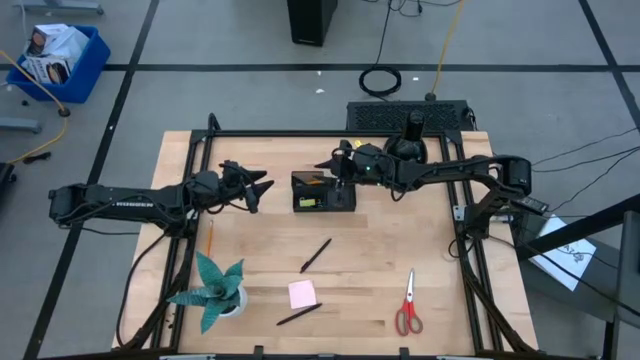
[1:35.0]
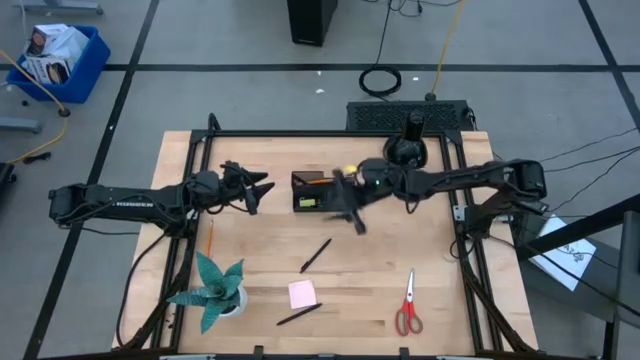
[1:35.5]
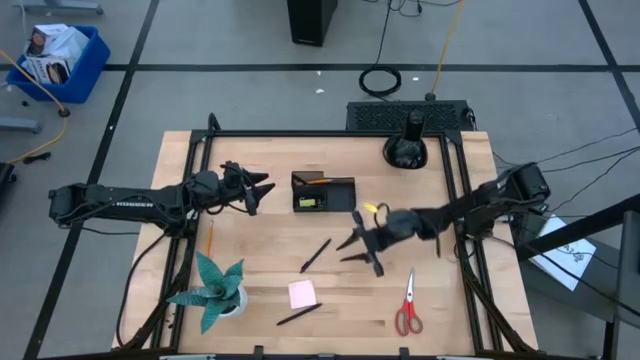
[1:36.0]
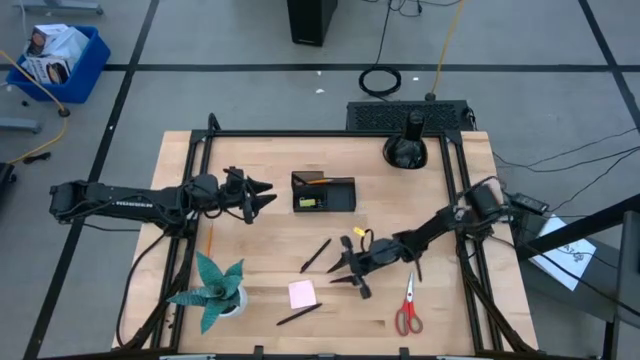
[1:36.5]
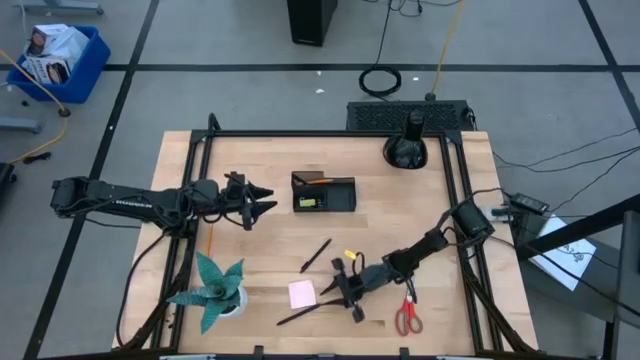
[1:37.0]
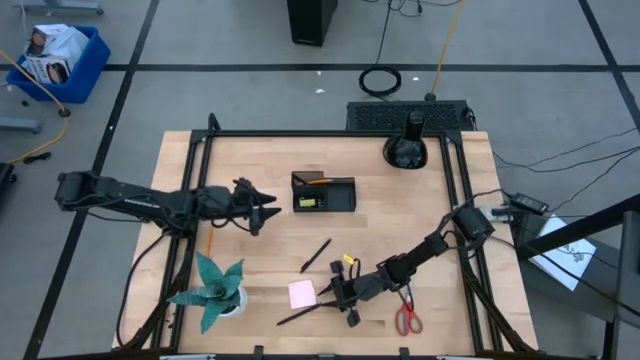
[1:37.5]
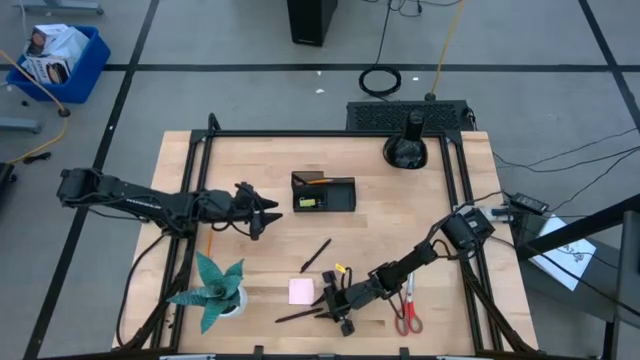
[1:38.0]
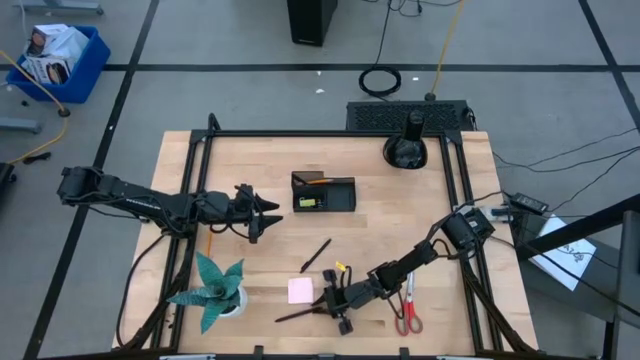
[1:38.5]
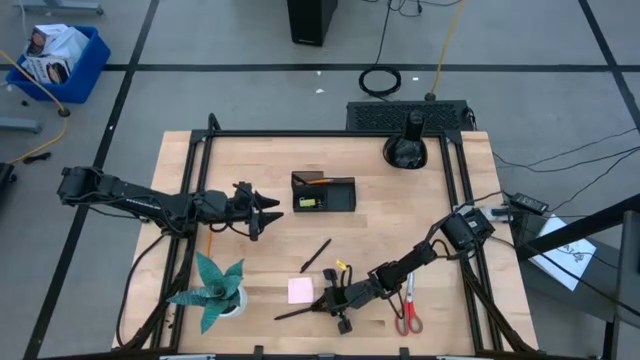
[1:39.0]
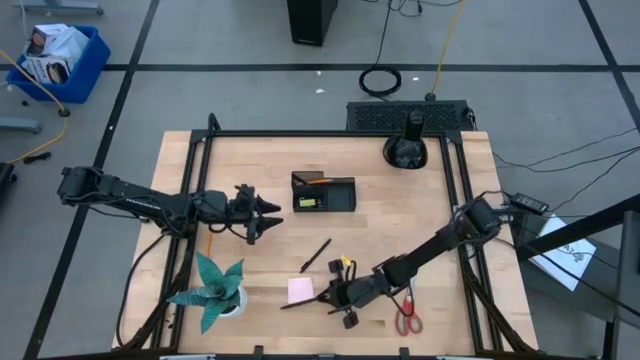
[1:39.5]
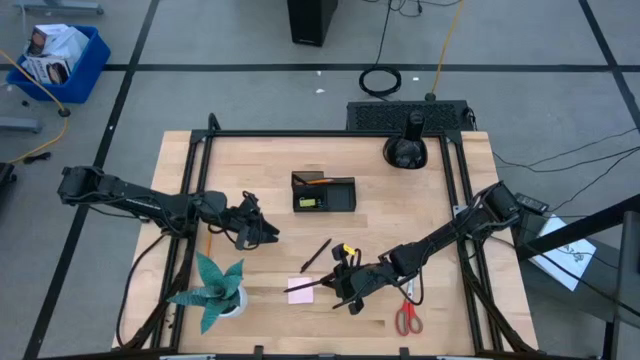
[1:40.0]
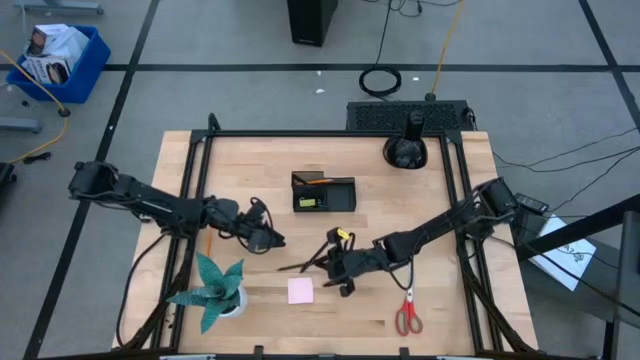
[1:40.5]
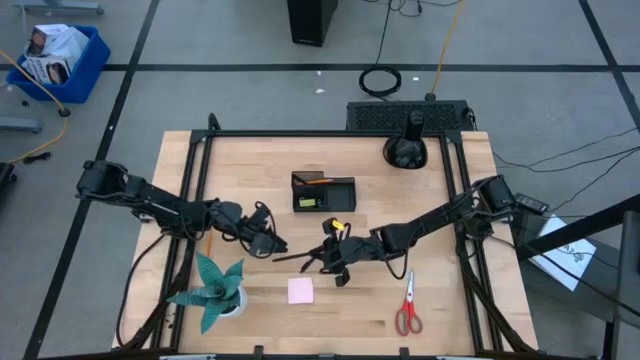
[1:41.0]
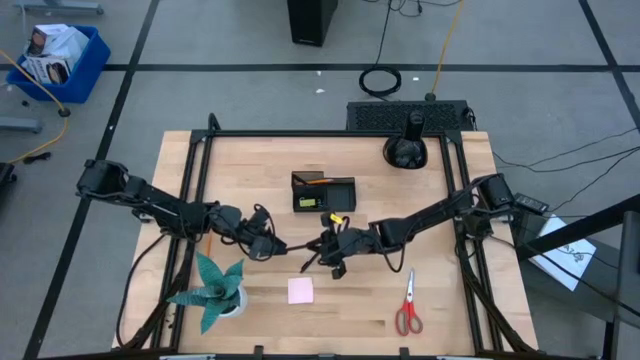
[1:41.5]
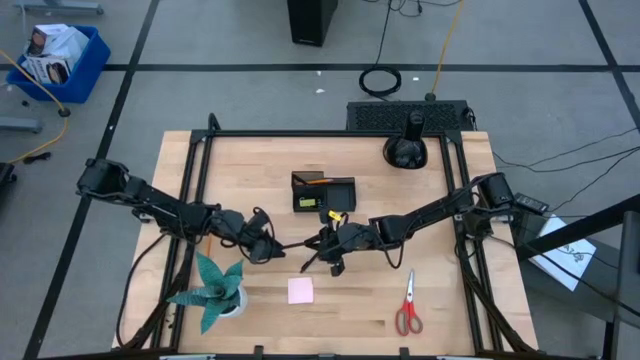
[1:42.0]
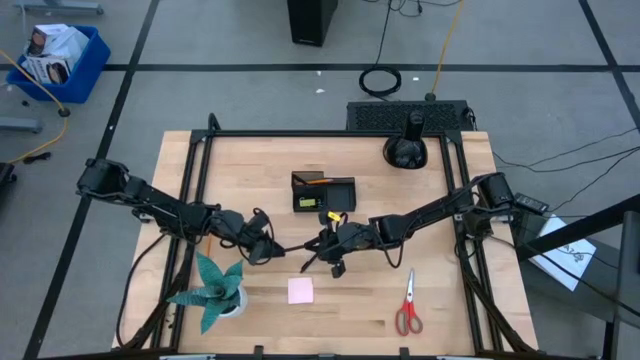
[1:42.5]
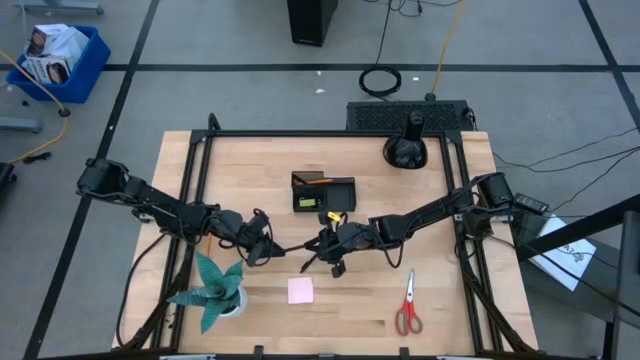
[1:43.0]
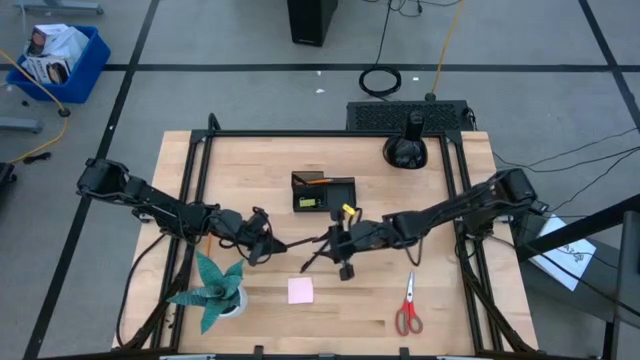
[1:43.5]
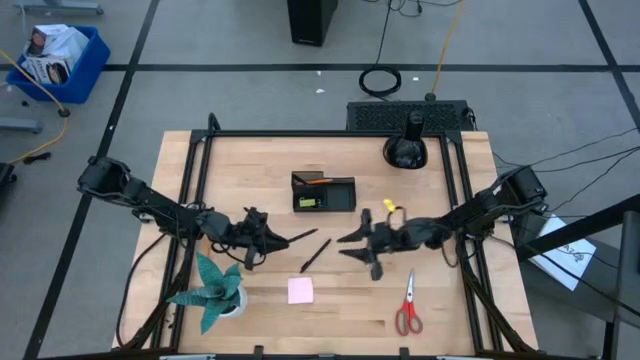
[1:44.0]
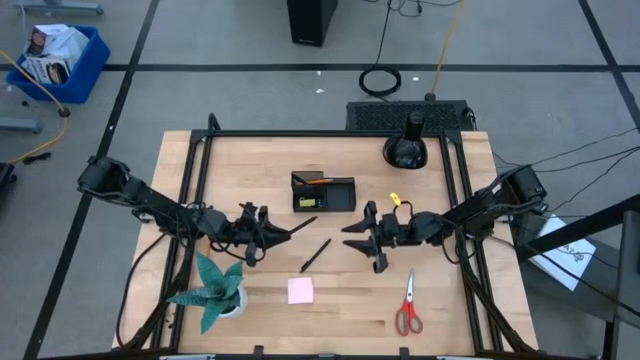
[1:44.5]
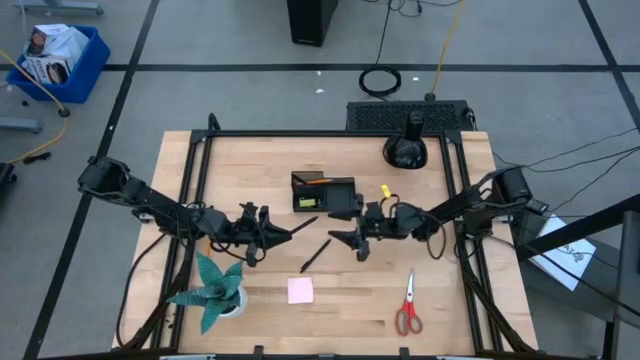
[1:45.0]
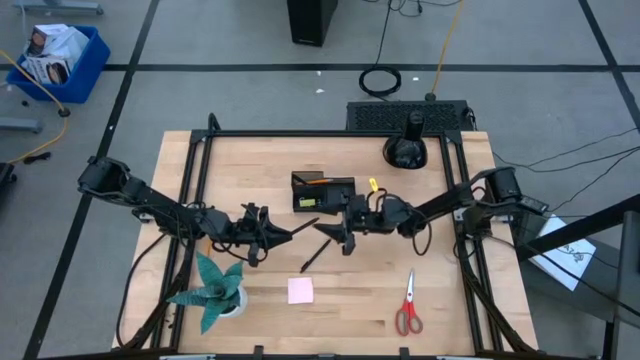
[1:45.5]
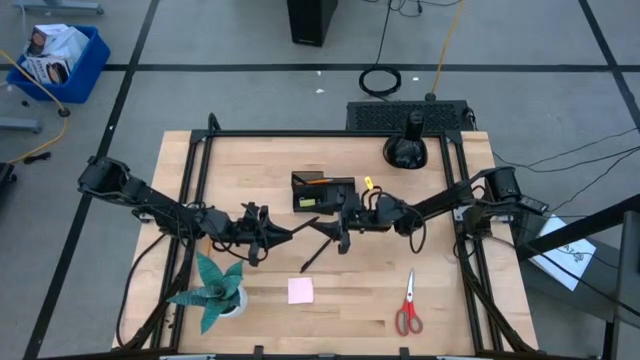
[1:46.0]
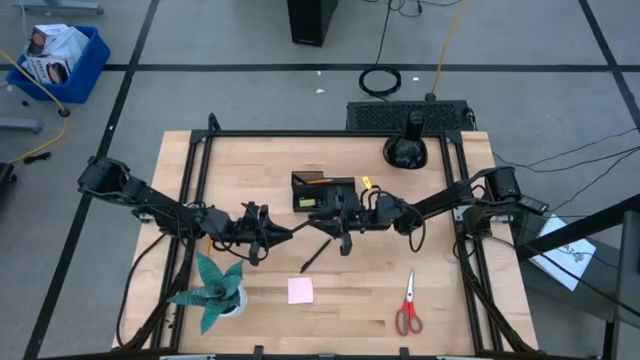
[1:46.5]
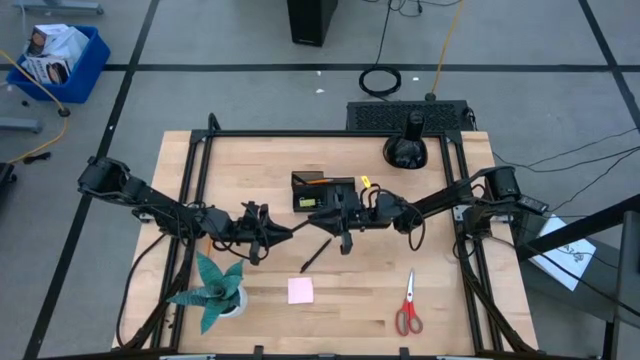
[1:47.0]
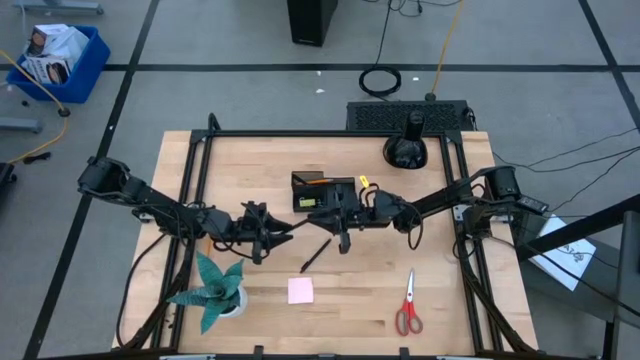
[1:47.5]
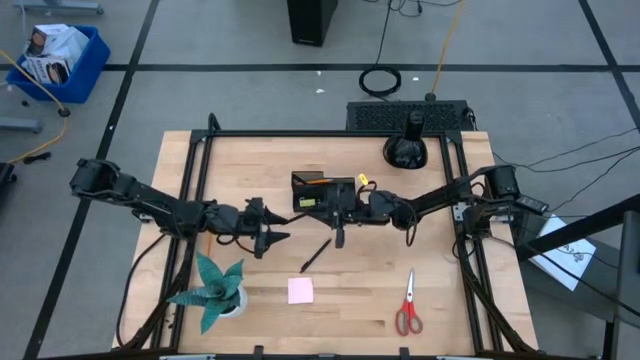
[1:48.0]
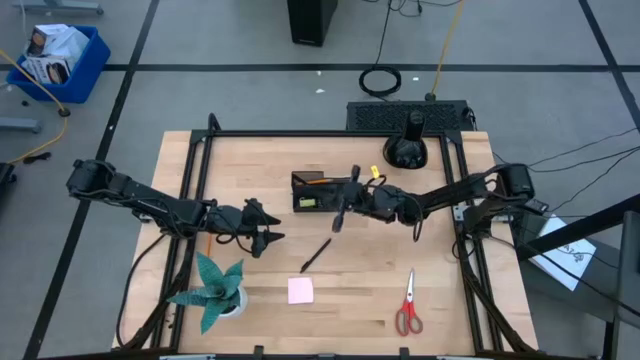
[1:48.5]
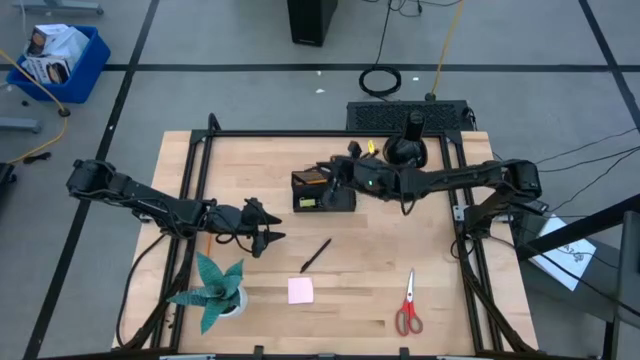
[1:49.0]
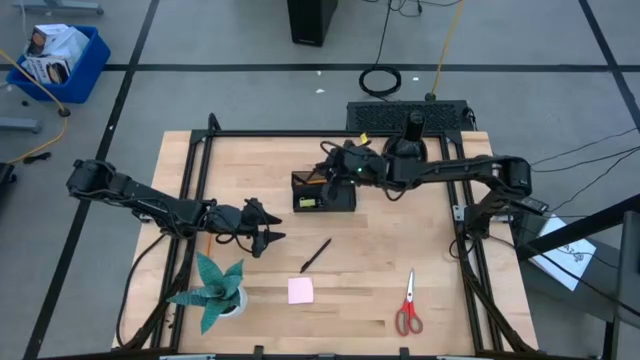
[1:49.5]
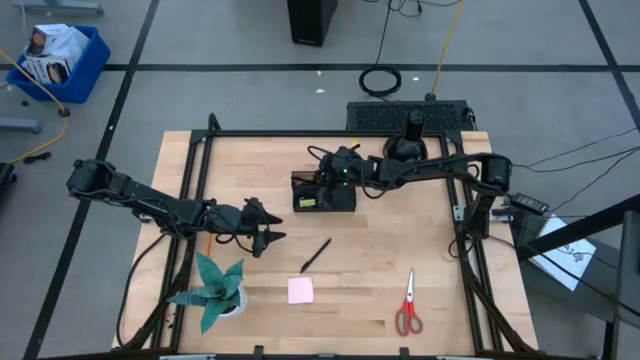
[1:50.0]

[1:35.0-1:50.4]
Task: Pick and place office supplies into organizer
Put the black pen into the black desk organizer

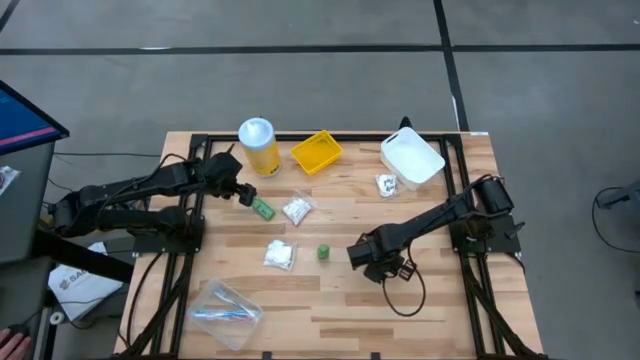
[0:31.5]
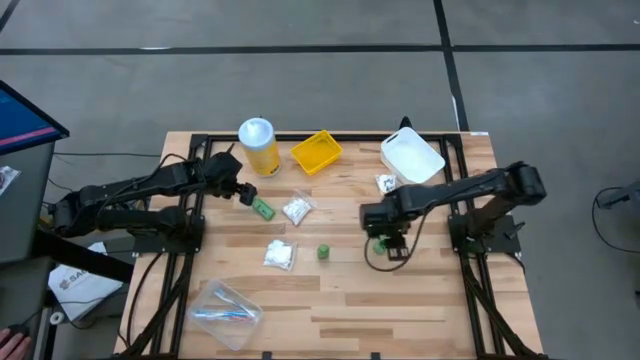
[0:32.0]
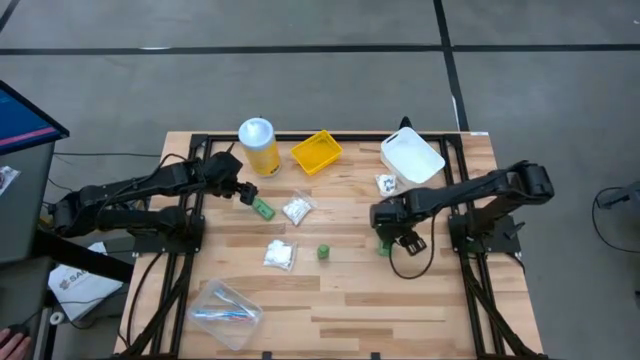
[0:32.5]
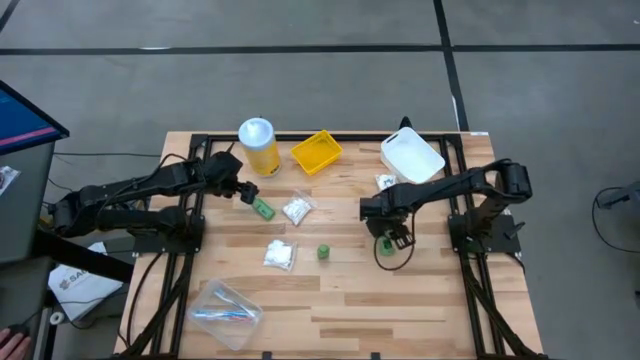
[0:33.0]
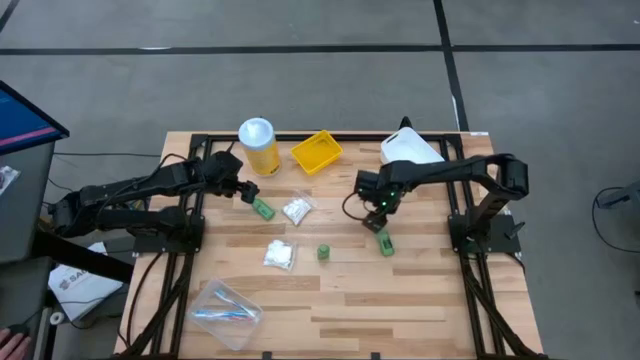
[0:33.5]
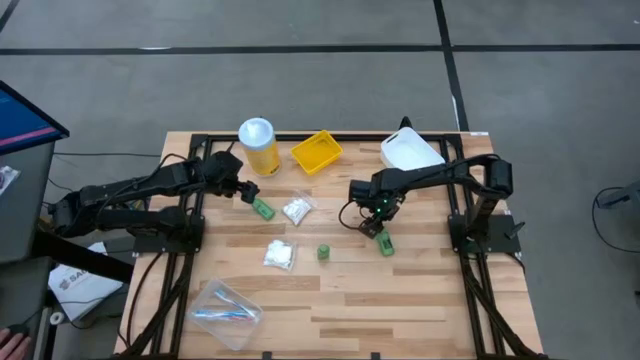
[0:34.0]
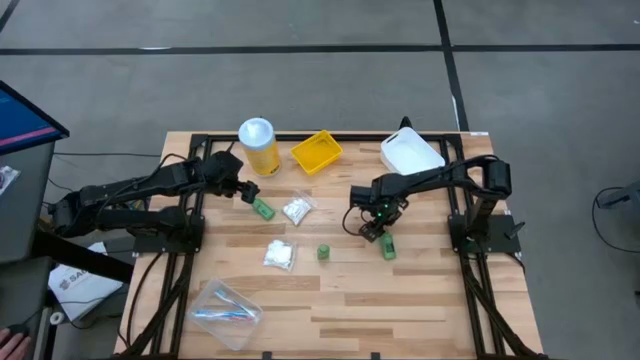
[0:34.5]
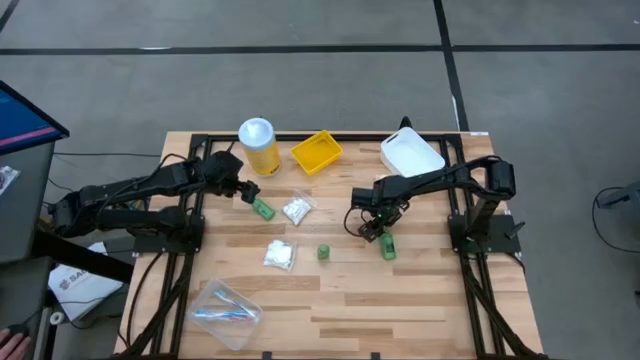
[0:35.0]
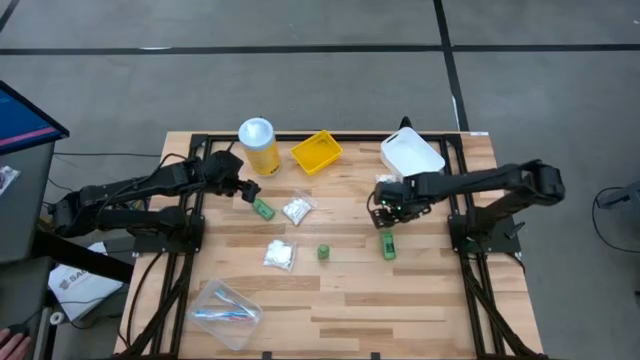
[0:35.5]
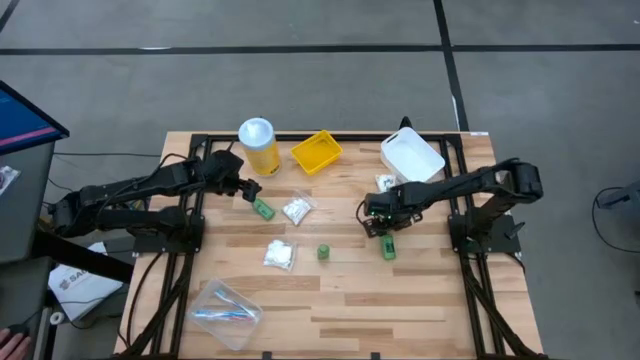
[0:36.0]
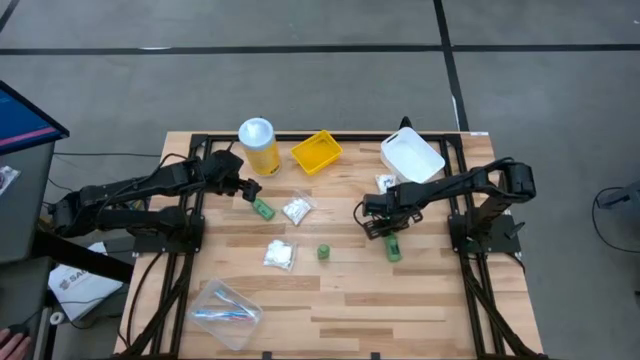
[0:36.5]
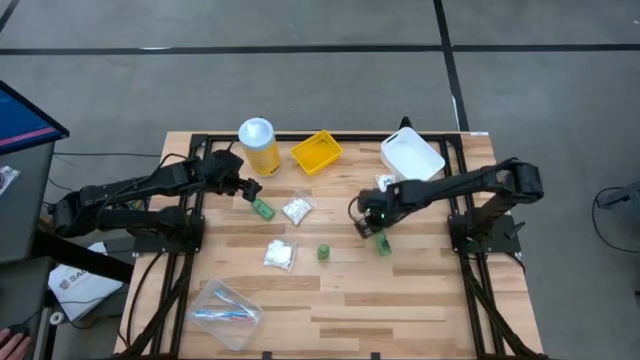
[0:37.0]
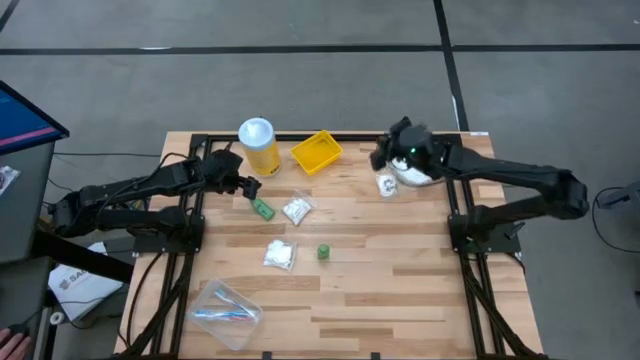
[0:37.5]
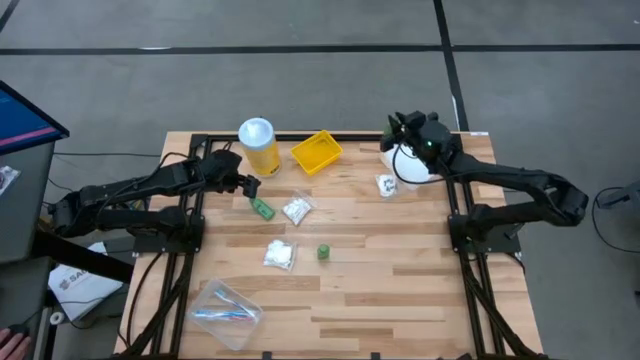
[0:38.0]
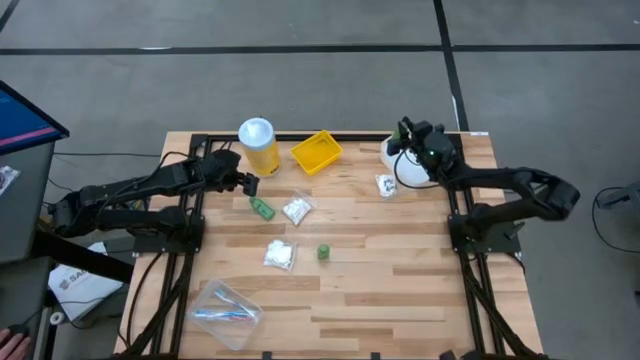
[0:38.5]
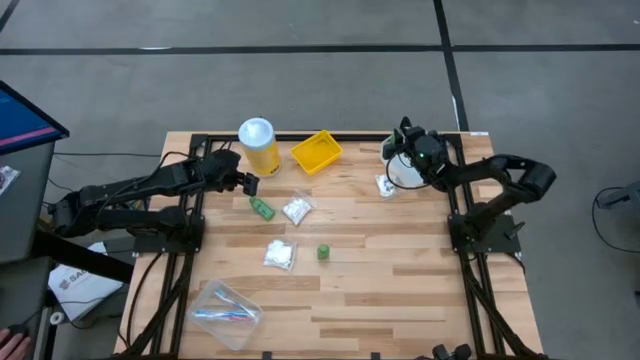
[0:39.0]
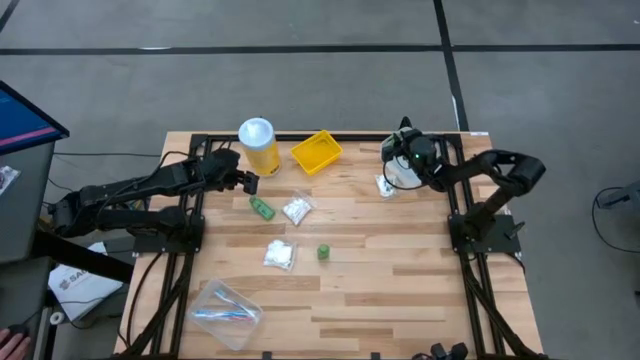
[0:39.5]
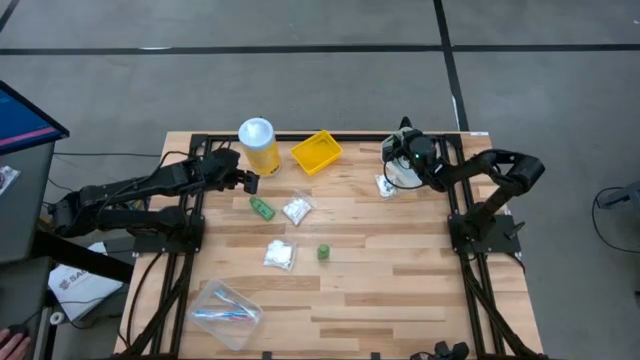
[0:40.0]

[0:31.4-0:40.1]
Task: Pick & Place Travel size toiletries
Put the green shampoo bottle into the white bin
